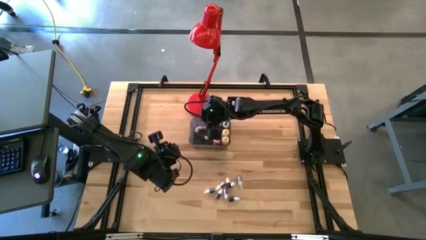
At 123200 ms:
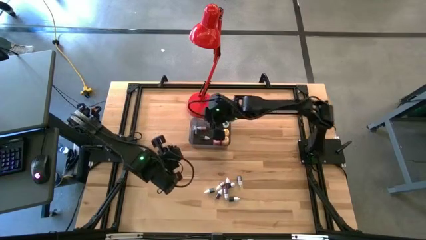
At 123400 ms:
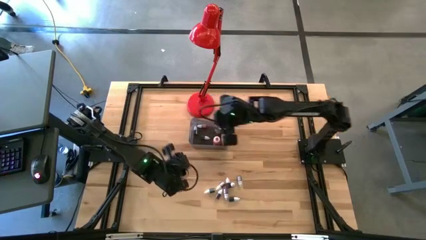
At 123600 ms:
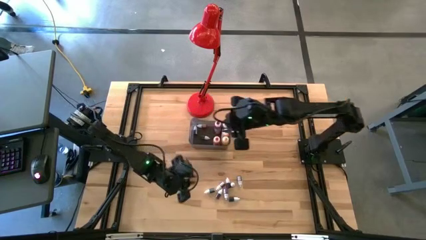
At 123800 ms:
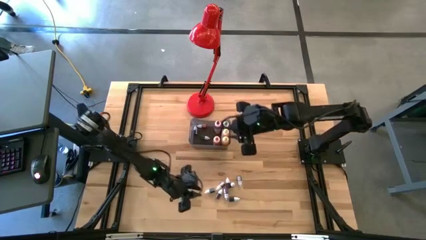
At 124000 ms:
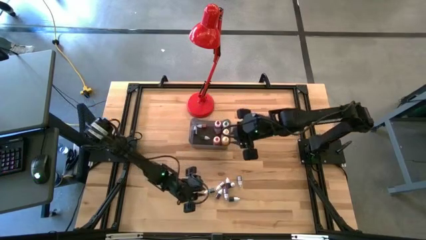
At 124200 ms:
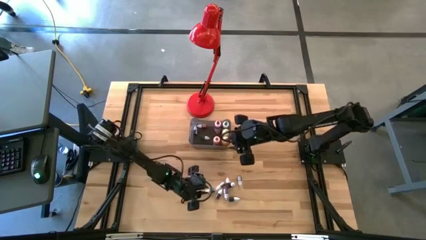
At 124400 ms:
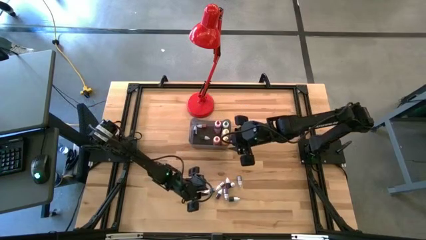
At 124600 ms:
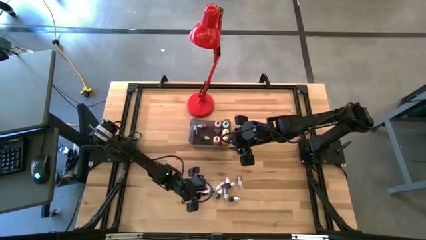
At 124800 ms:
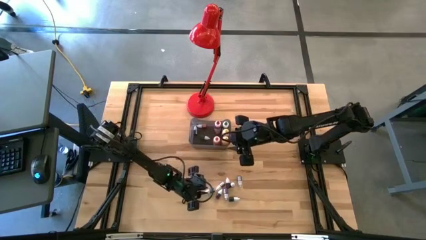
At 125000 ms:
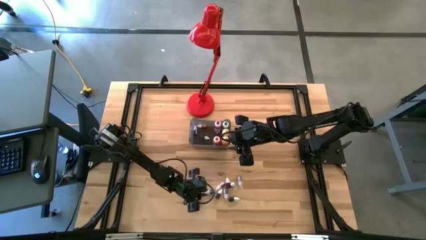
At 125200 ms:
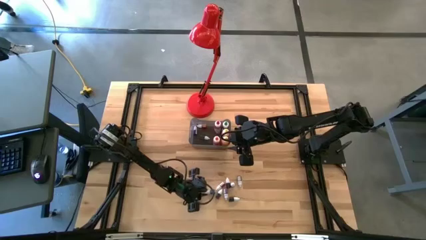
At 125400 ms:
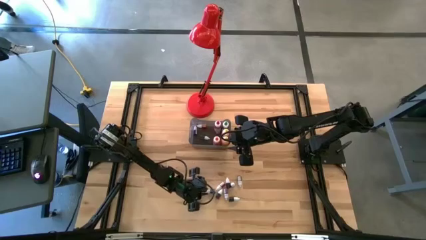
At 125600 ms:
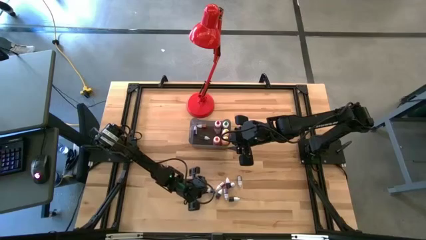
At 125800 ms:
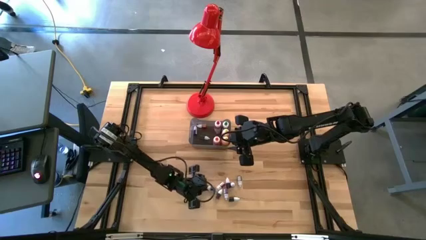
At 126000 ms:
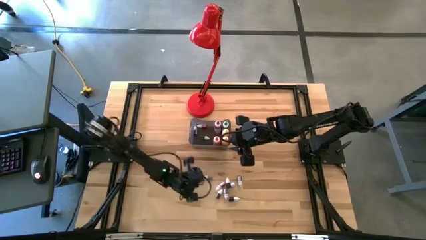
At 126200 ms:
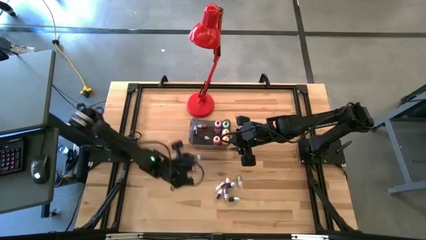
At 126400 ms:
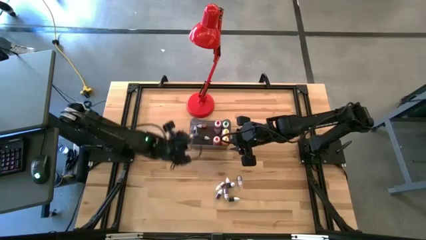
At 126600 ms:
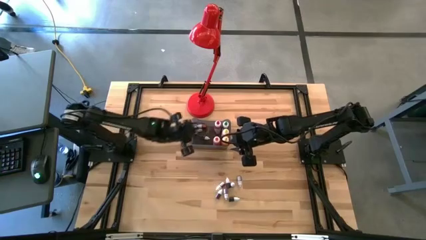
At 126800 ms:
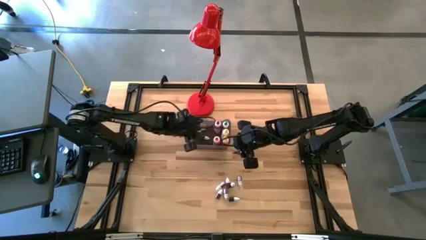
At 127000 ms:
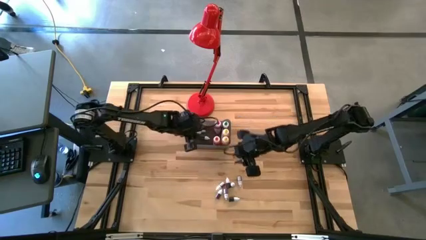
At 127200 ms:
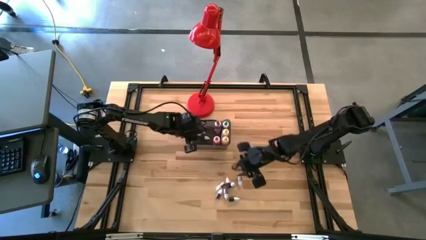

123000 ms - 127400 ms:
Task: Pick & Place food coloring
Put the top small green food coloring bottle into the black bin

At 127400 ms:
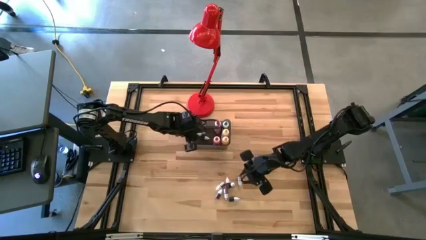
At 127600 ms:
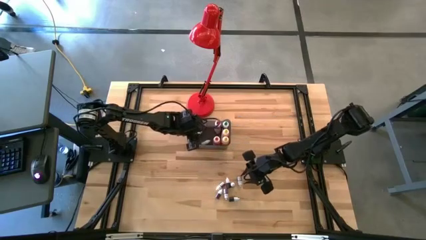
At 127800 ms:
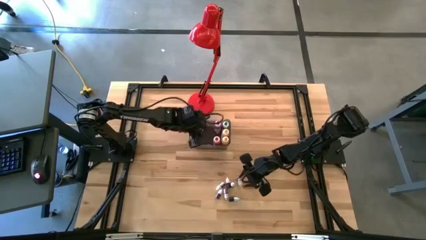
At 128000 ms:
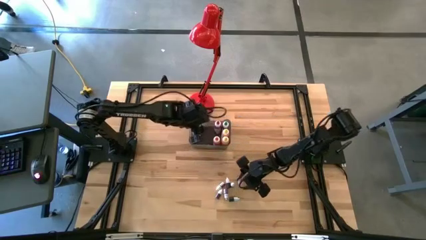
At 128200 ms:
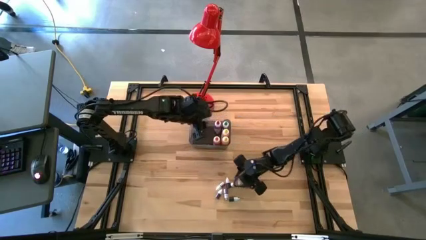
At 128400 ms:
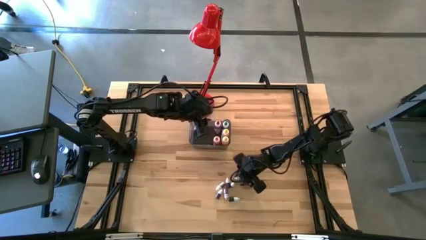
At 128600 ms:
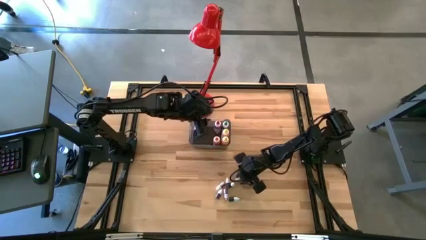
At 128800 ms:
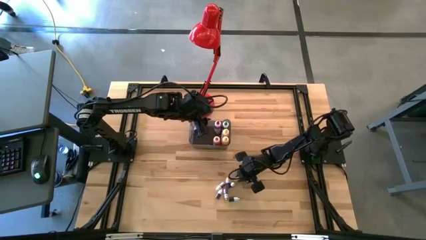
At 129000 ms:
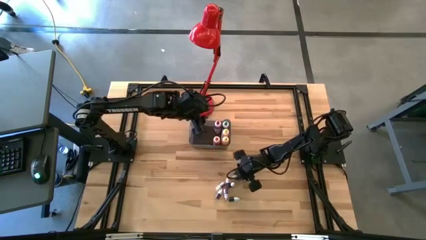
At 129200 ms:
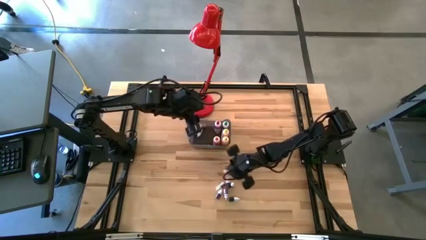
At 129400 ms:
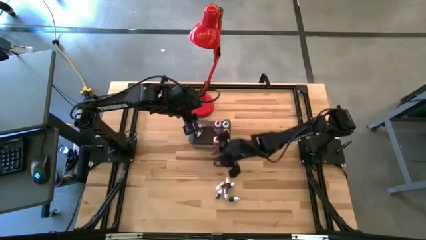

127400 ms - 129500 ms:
Put the right small blue food coloring bottle into the black bin

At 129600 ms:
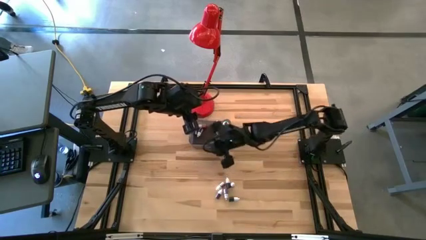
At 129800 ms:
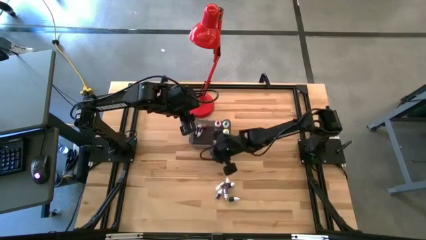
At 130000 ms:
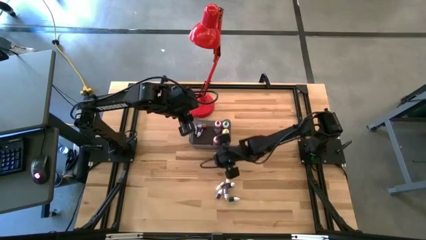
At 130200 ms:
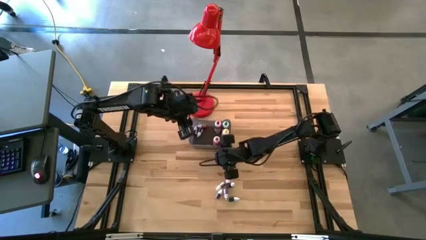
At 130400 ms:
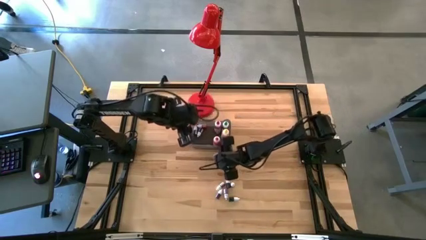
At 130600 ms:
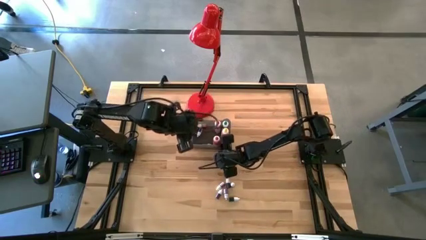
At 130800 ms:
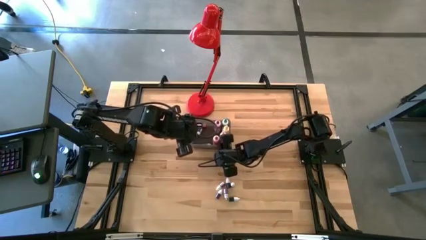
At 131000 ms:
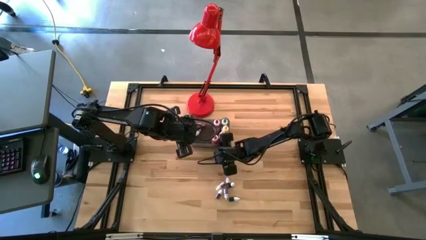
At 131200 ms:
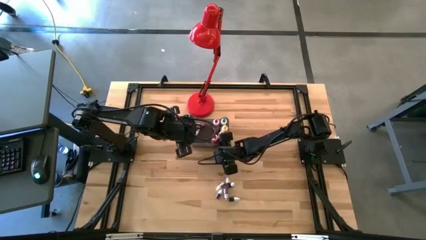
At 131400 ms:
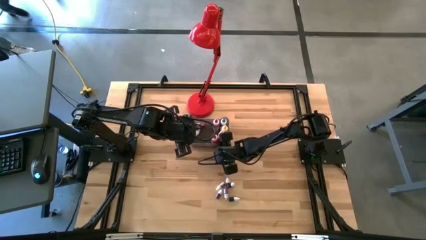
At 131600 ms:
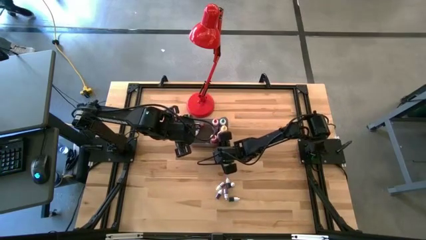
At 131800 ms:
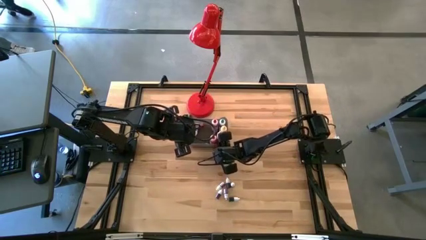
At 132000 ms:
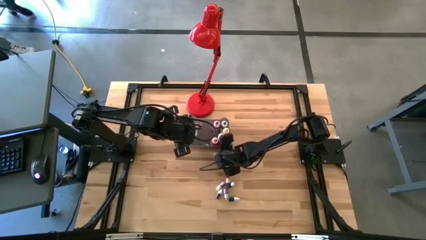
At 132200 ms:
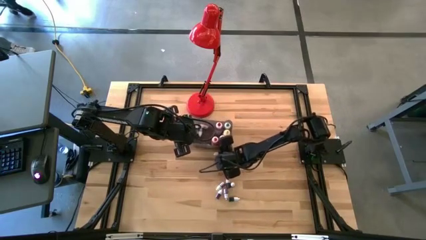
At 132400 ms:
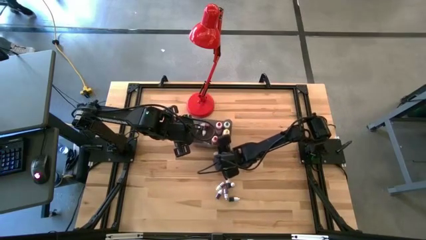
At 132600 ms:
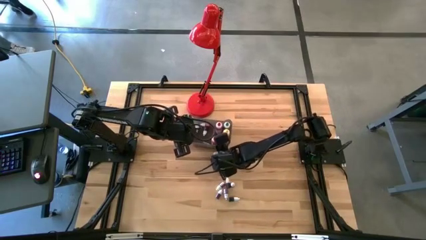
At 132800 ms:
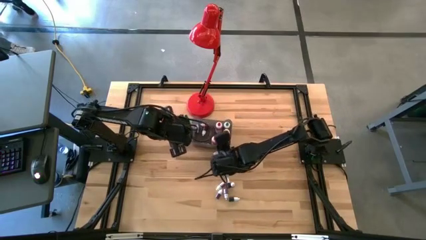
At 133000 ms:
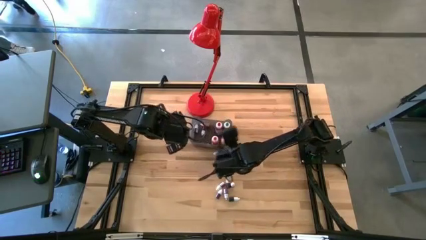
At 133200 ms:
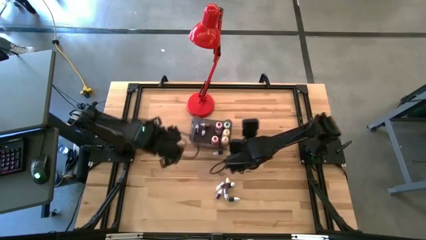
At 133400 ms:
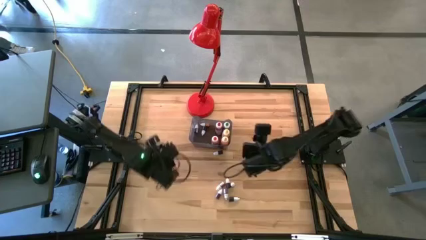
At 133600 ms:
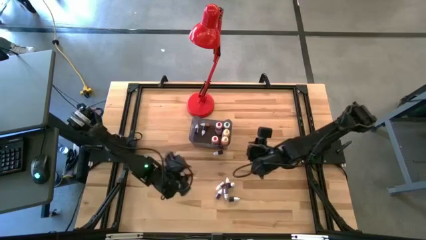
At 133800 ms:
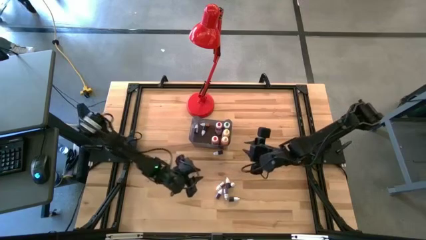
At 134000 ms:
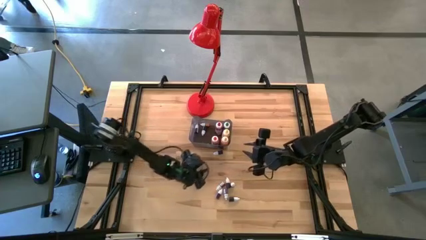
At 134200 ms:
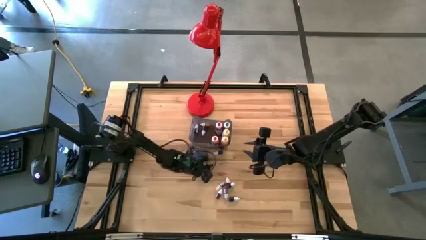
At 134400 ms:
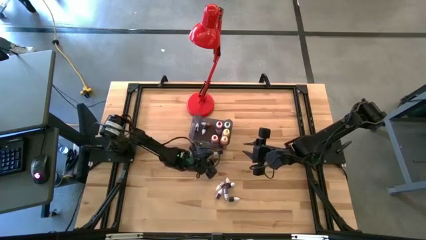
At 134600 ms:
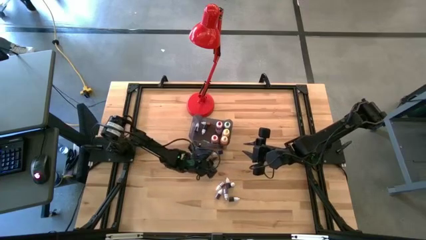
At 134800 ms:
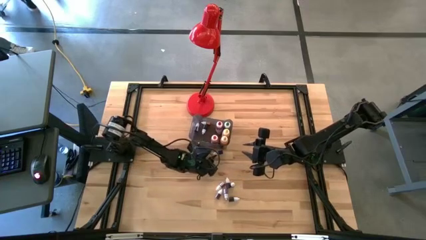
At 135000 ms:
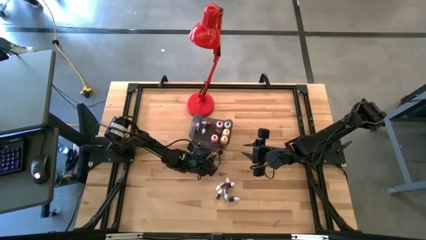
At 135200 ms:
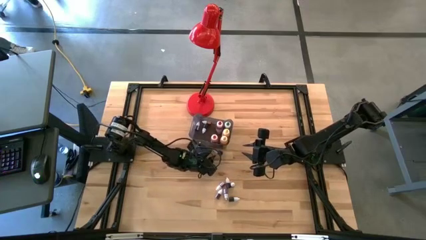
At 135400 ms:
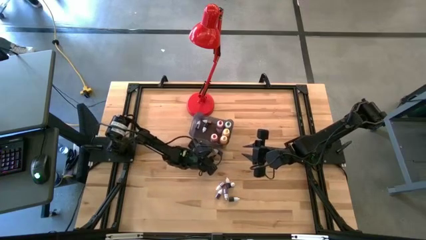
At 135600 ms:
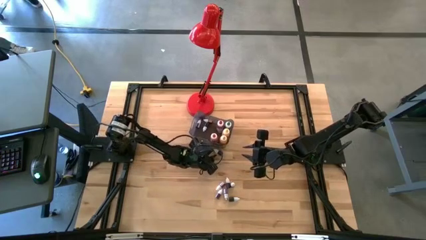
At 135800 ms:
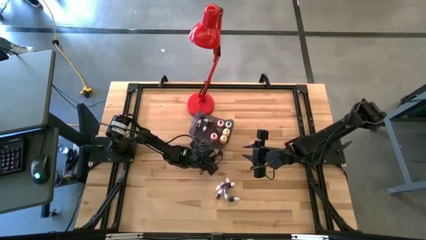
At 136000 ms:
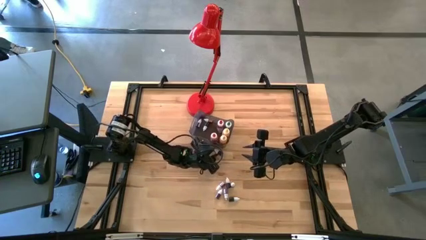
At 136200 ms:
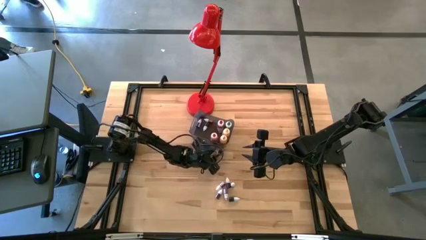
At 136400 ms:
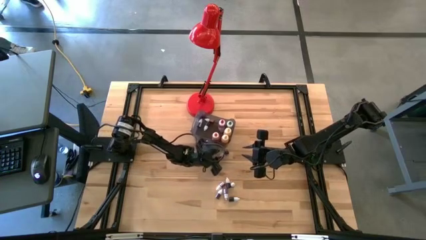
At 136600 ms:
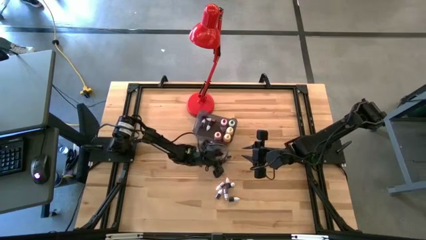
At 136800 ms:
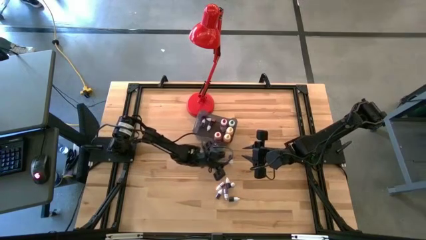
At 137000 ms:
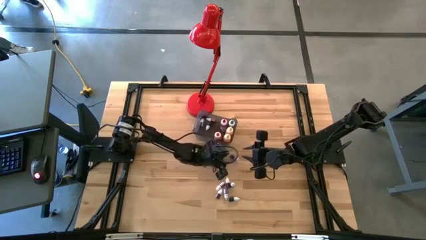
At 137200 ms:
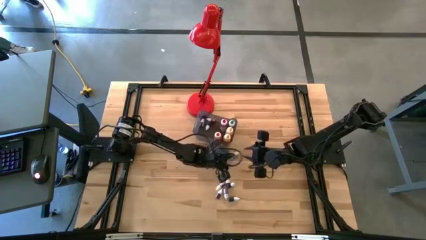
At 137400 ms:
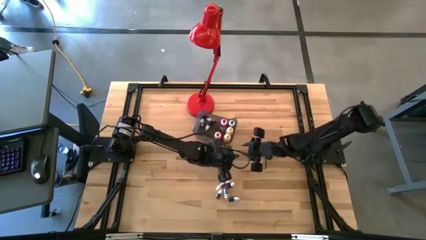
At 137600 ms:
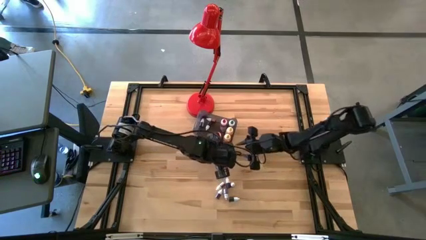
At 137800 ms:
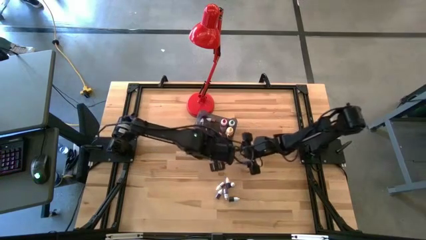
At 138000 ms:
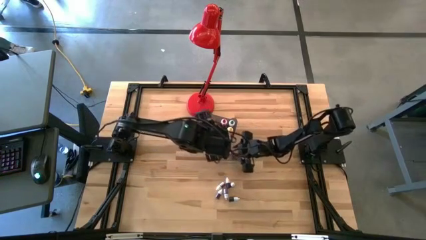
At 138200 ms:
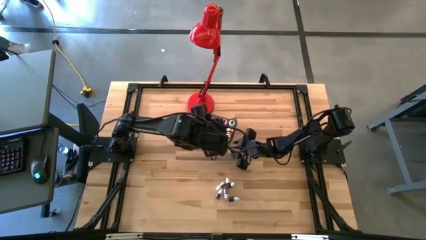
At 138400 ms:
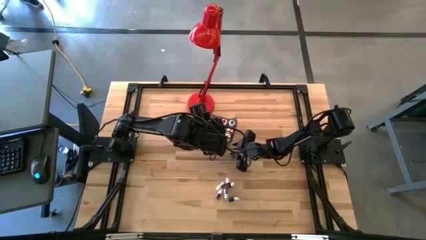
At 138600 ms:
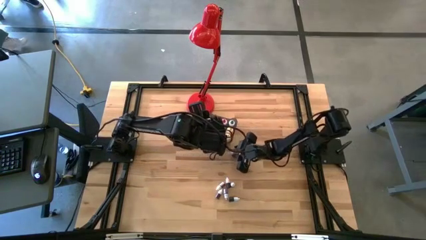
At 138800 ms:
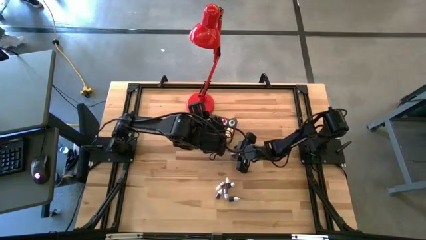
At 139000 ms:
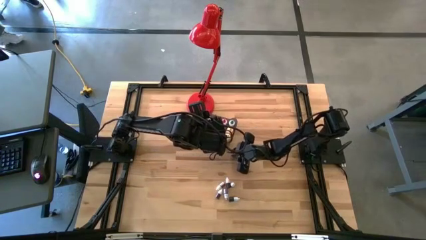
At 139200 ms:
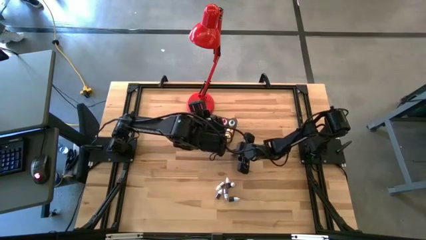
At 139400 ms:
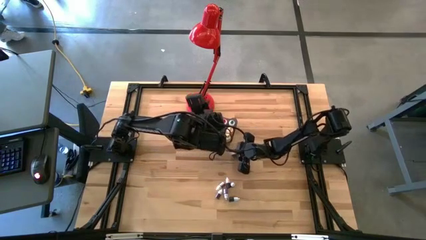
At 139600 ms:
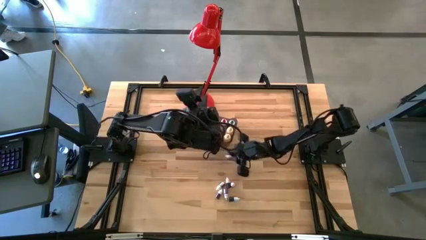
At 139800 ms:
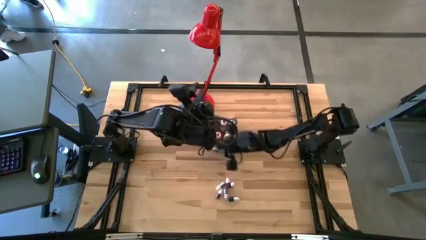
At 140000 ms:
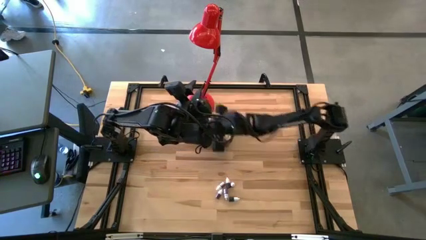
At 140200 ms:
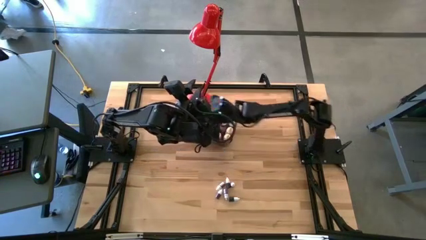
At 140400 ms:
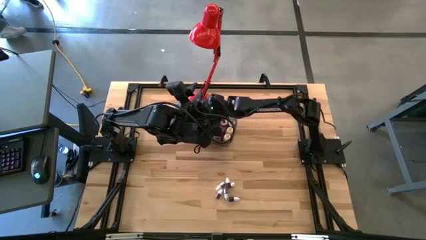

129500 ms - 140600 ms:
Put the right small blue food coloring bottle into the black bin
